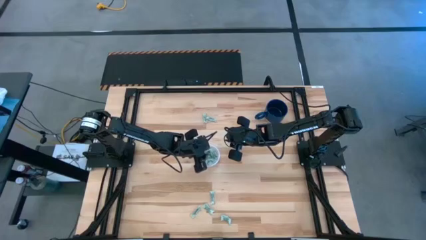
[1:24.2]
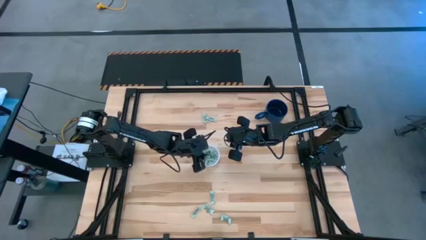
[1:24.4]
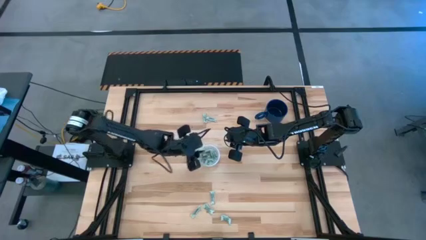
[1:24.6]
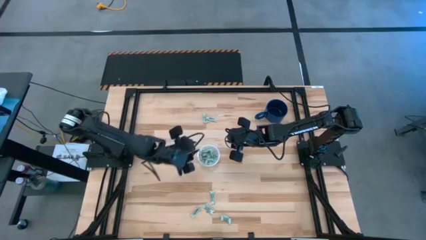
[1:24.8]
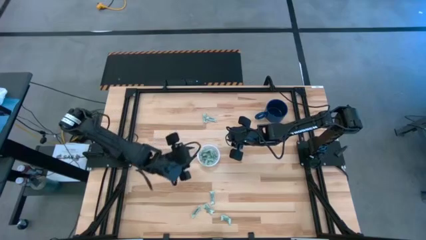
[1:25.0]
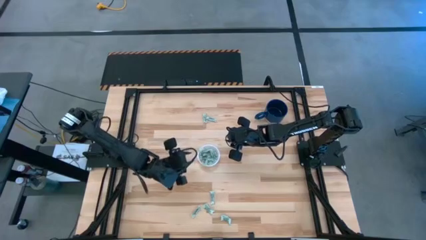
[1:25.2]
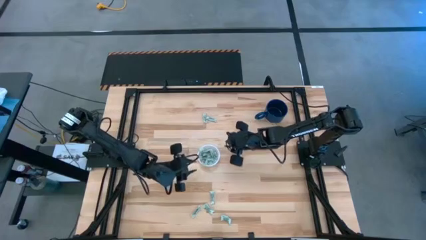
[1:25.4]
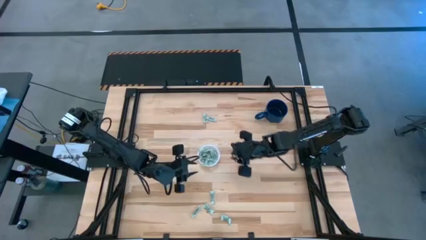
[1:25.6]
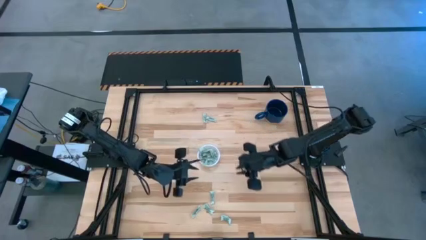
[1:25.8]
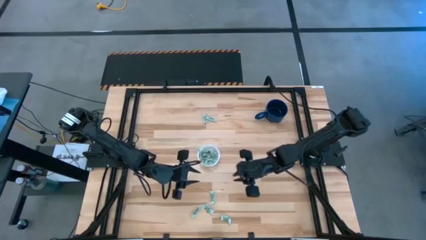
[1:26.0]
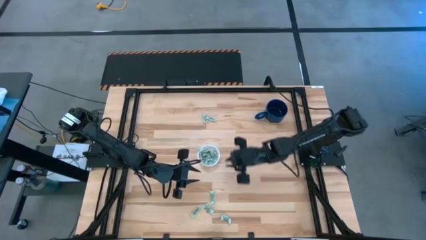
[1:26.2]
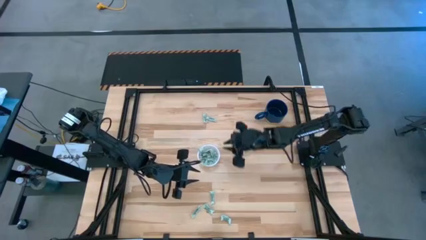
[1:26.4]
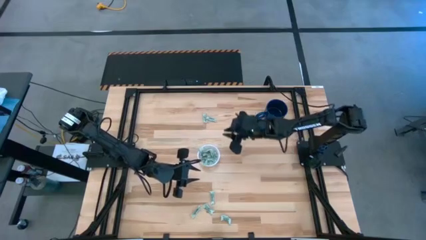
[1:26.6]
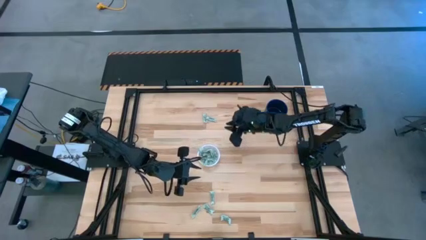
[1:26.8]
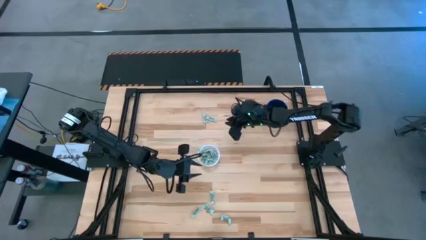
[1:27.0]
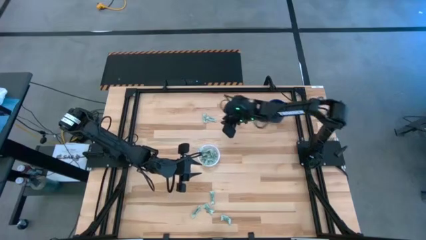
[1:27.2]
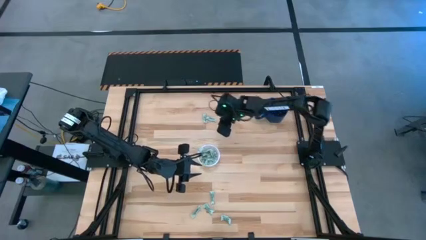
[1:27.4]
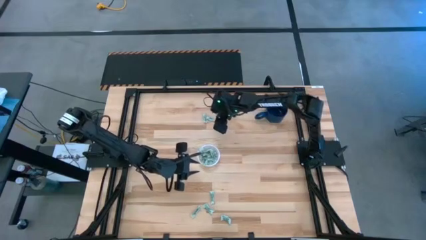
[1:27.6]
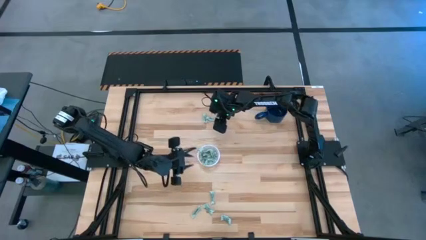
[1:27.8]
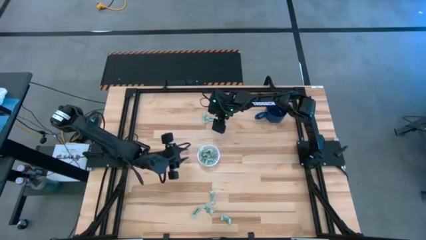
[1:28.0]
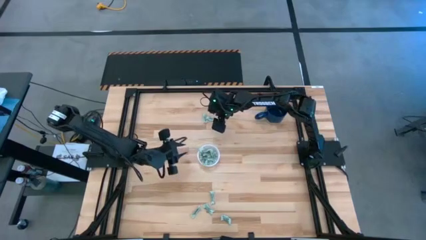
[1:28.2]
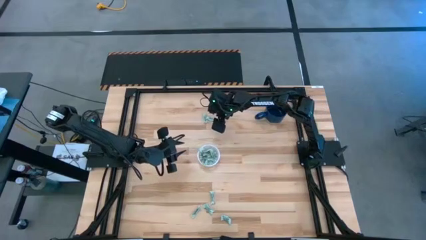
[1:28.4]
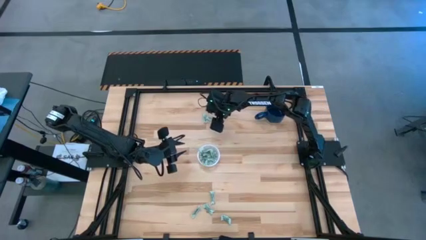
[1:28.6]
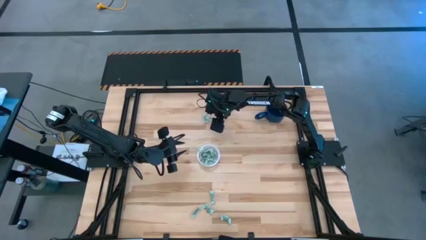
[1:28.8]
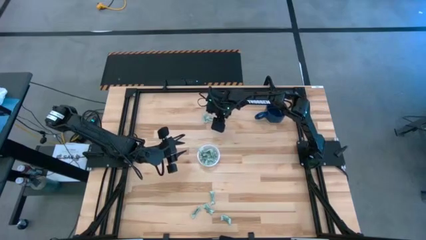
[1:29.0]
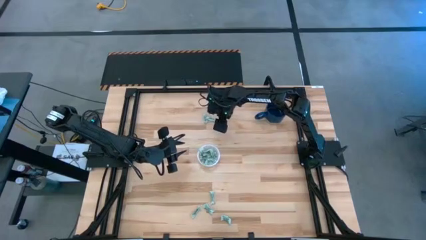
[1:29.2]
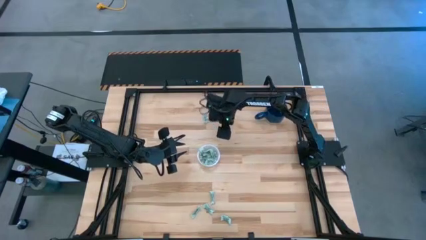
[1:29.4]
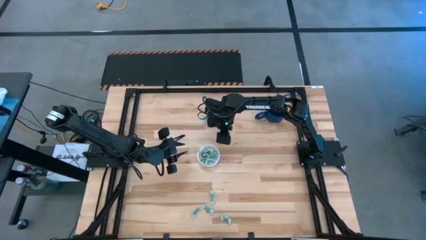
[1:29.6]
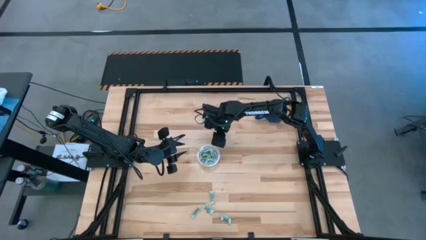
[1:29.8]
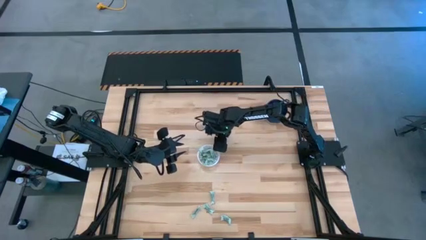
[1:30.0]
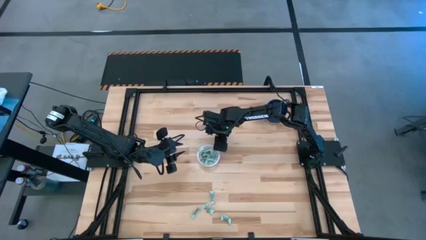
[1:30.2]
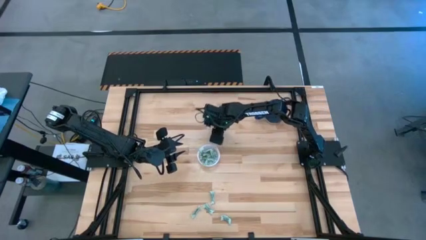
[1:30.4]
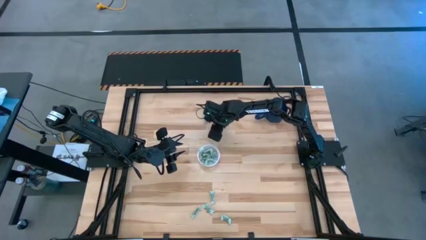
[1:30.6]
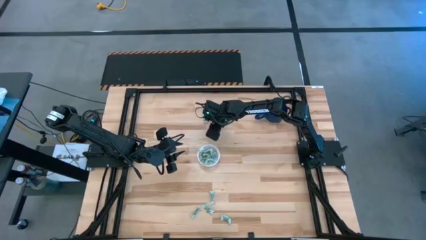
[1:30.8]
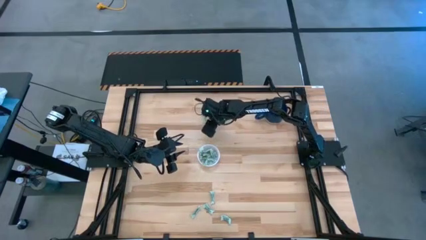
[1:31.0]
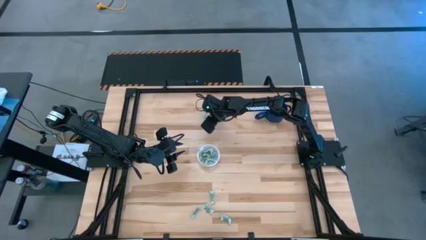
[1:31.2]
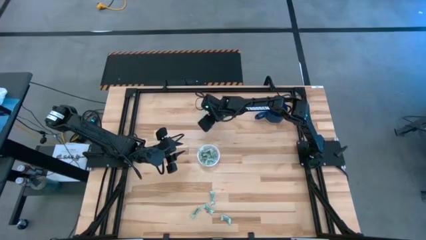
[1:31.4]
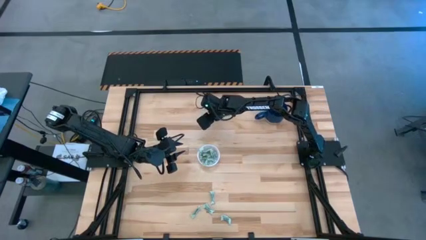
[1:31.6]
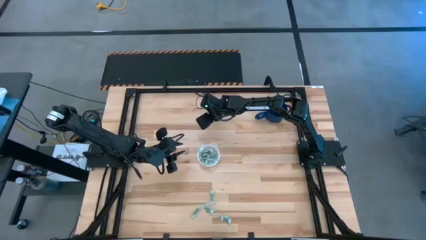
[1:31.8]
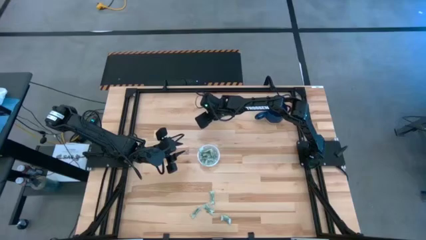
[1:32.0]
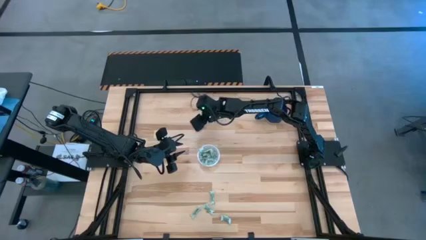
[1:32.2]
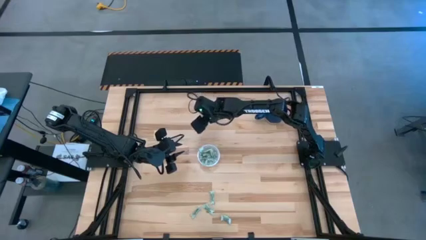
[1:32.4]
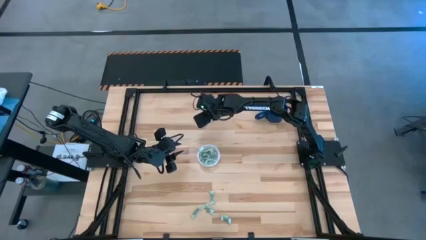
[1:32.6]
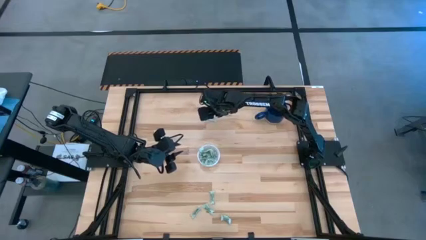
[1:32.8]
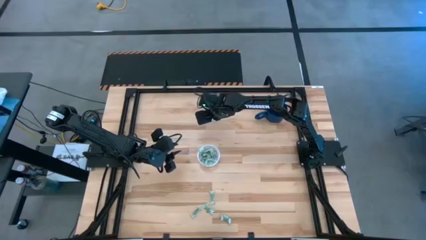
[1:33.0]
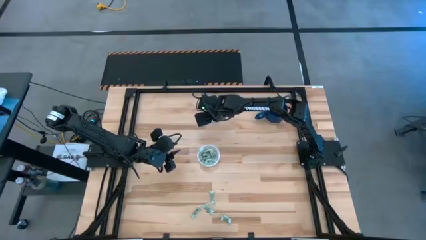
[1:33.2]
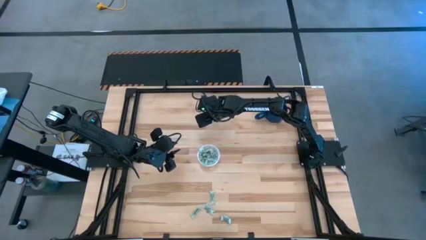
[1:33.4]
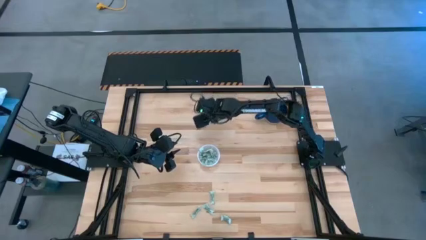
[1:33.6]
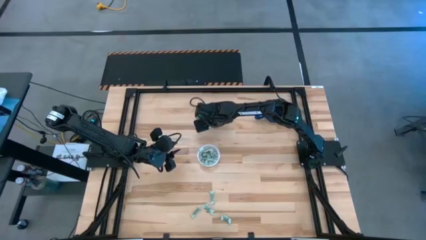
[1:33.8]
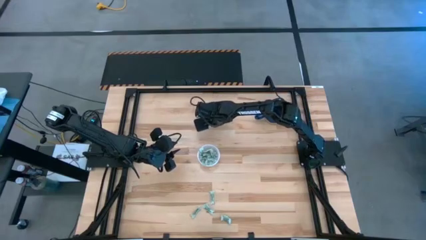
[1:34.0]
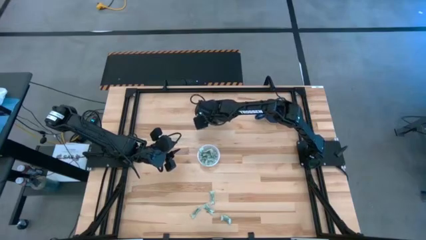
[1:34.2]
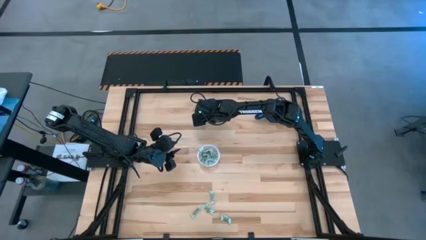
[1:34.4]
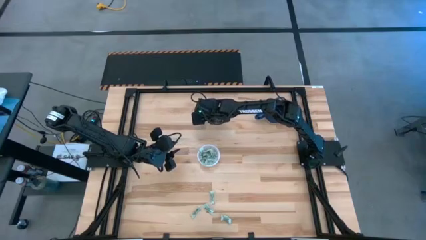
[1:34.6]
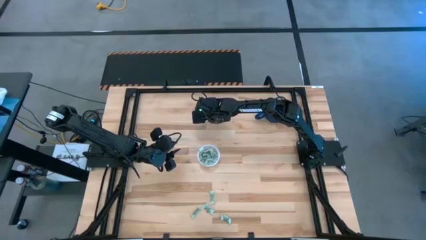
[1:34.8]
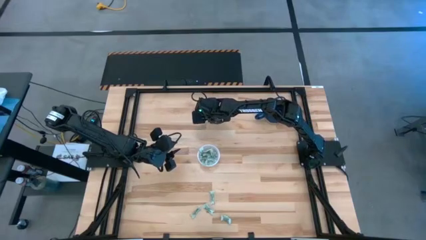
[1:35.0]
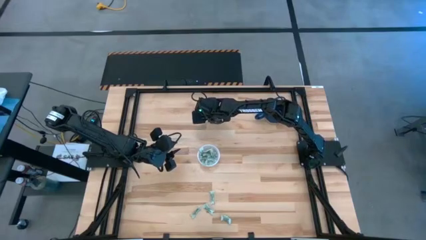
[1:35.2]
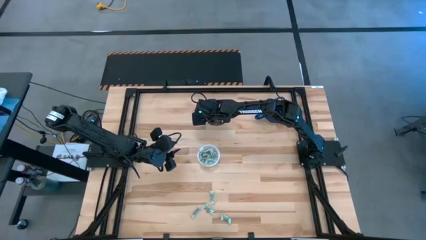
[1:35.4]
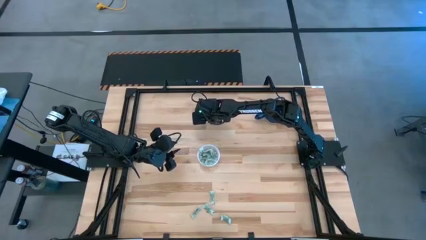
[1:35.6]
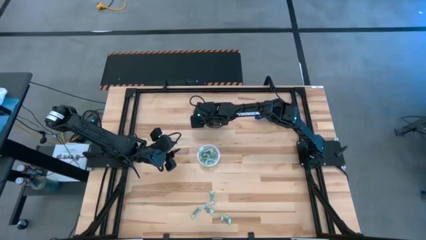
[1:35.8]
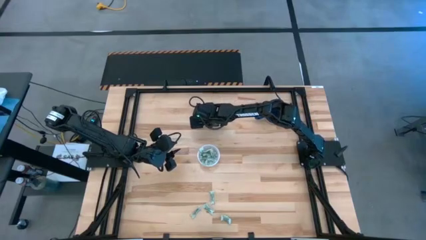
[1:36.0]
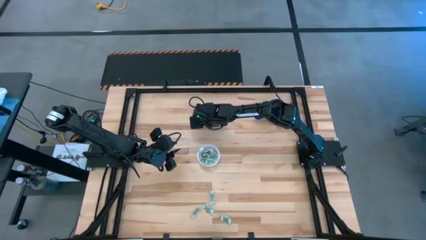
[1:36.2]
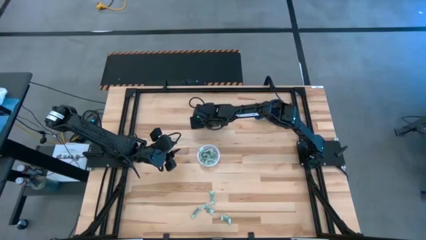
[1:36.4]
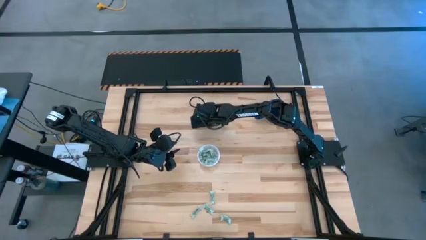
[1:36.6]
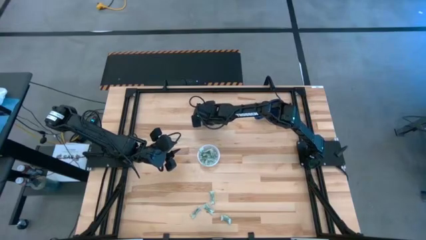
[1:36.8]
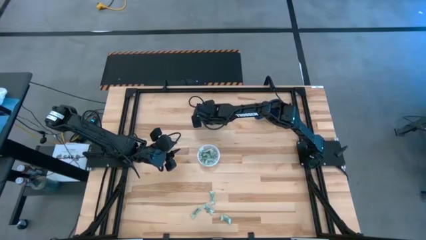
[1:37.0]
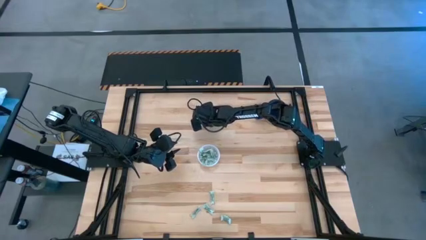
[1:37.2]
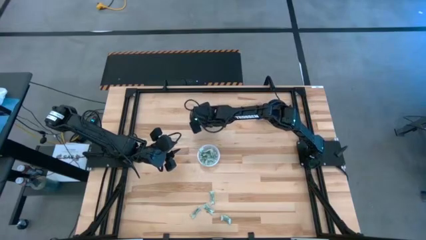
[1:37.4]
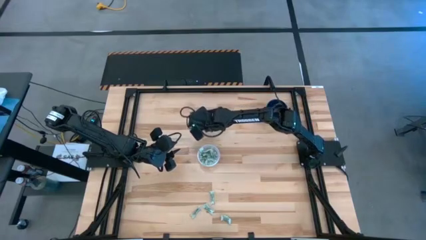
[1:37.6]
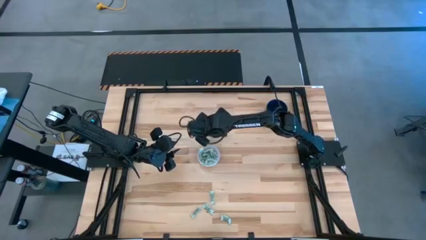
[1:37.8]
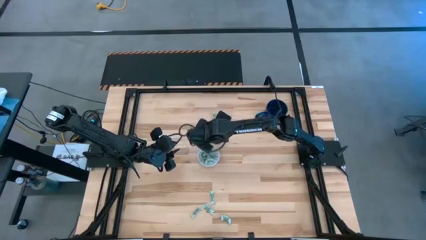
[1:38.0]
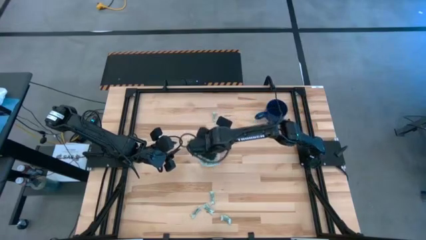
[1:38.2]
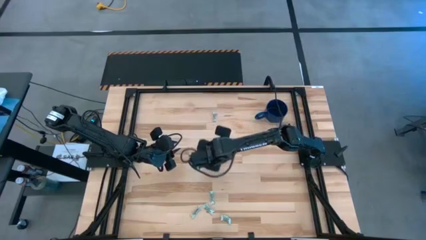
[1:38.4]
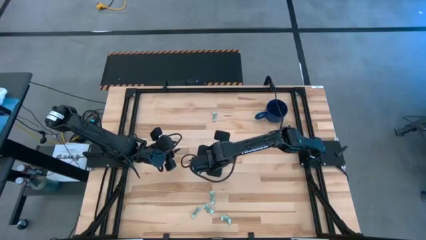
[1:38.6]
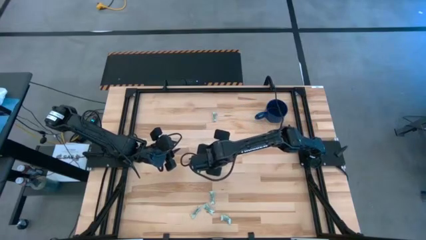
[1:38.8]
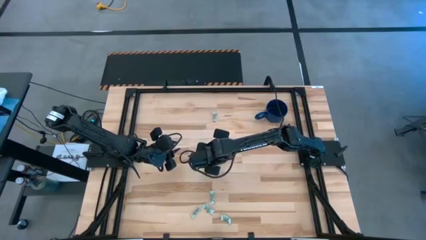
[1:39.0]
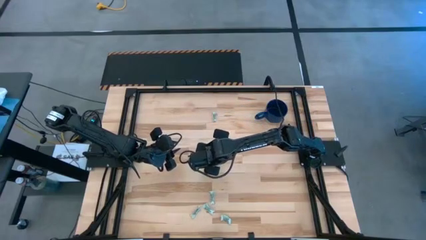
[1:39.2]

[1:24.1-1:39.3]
Task: Pick and place items into bin
Put the stevia packet into the transparent bin
